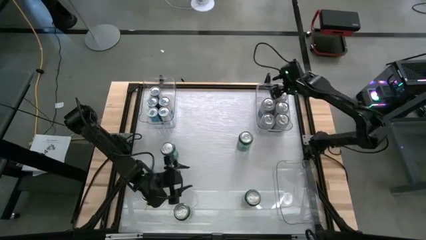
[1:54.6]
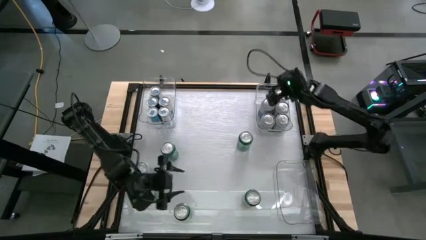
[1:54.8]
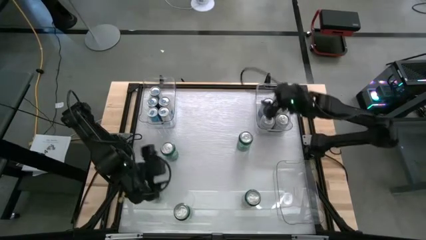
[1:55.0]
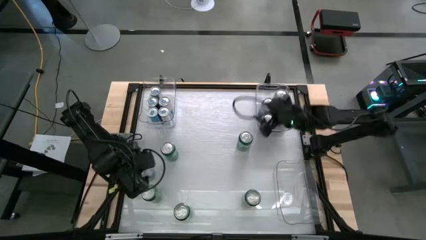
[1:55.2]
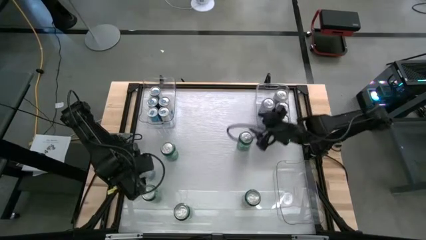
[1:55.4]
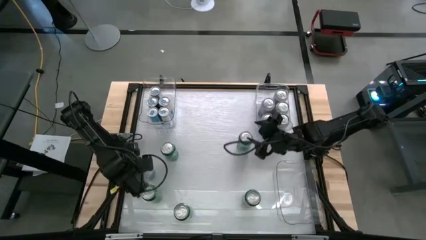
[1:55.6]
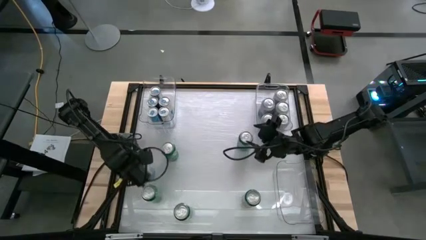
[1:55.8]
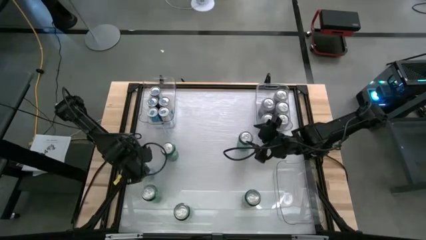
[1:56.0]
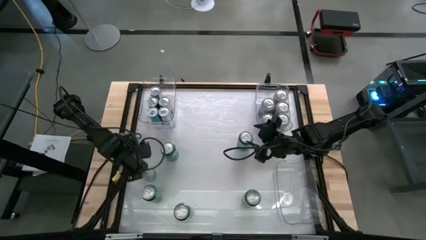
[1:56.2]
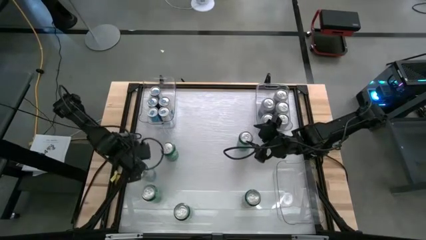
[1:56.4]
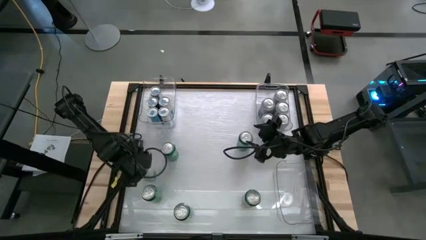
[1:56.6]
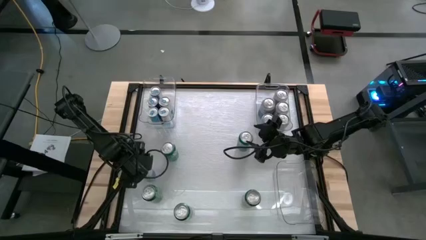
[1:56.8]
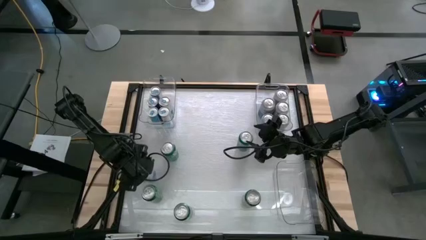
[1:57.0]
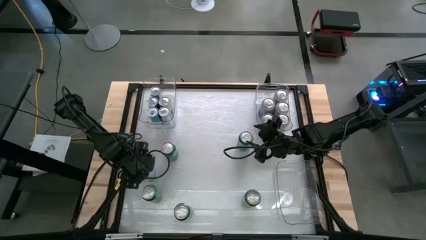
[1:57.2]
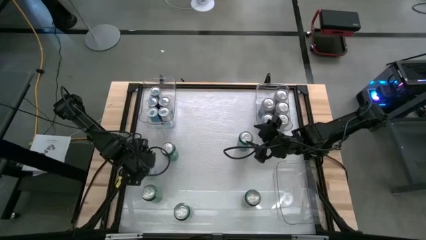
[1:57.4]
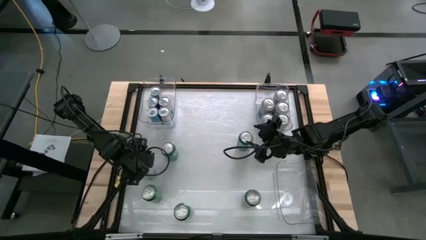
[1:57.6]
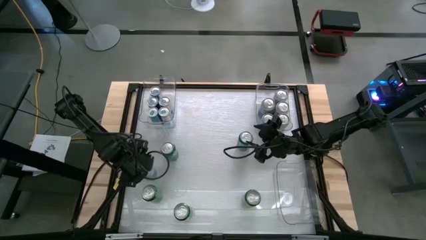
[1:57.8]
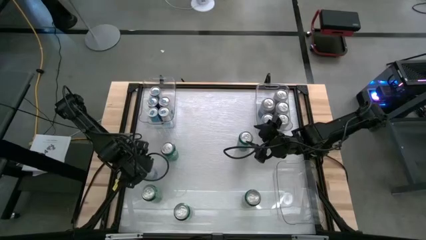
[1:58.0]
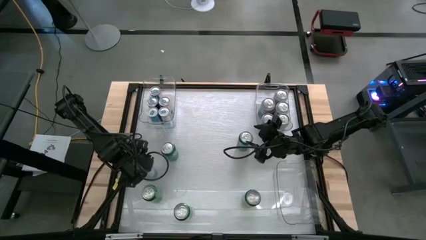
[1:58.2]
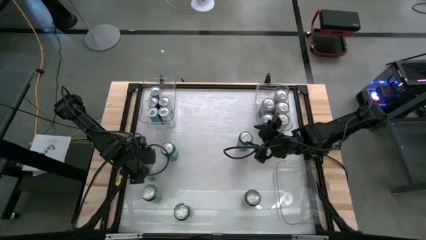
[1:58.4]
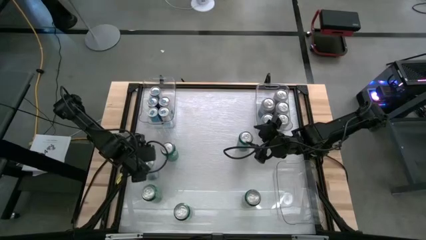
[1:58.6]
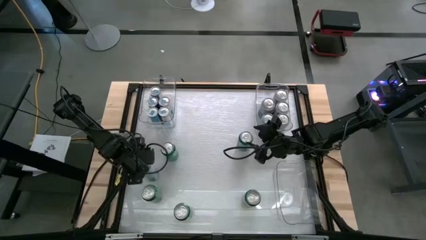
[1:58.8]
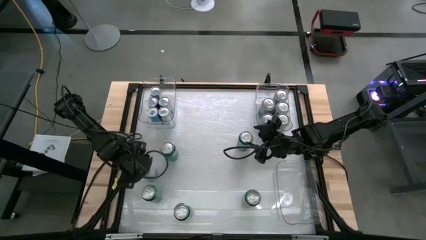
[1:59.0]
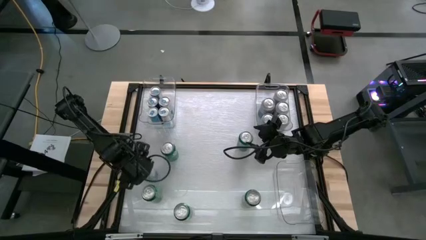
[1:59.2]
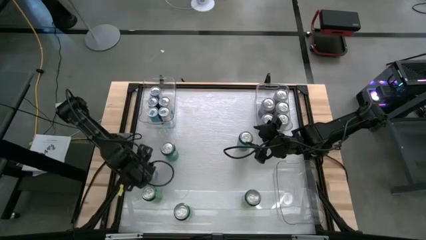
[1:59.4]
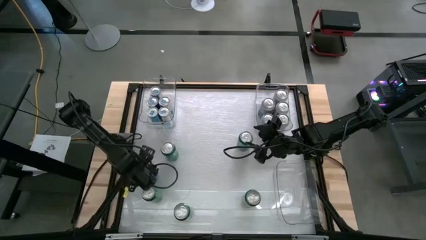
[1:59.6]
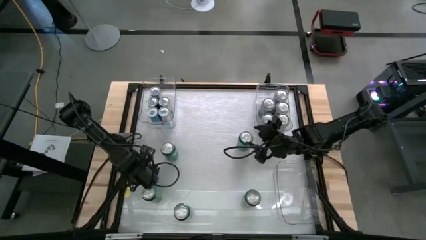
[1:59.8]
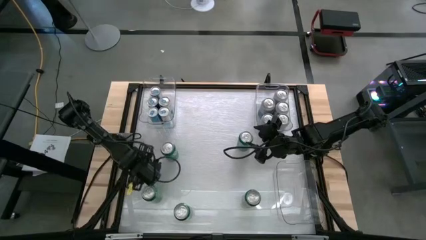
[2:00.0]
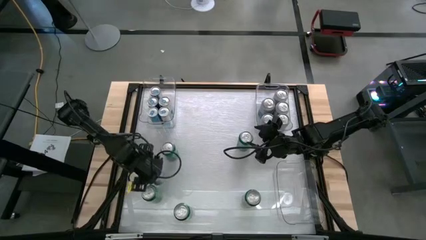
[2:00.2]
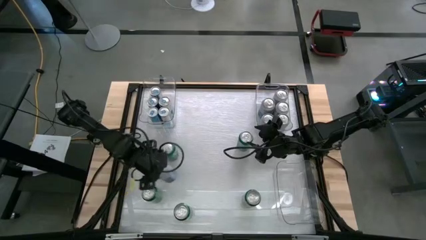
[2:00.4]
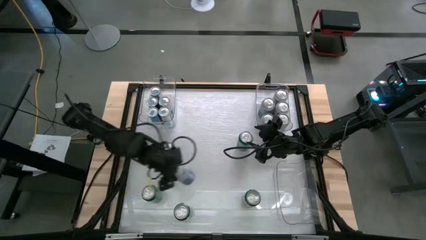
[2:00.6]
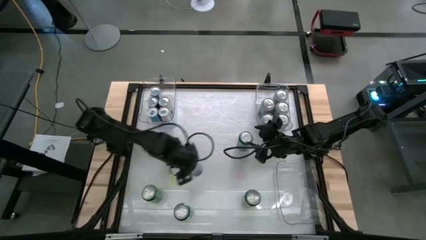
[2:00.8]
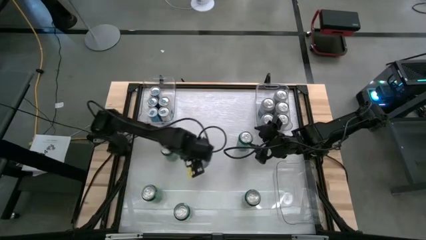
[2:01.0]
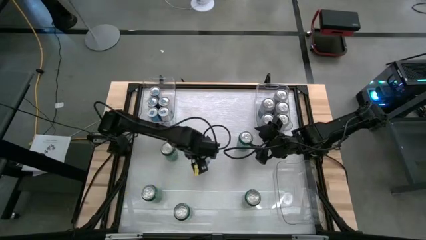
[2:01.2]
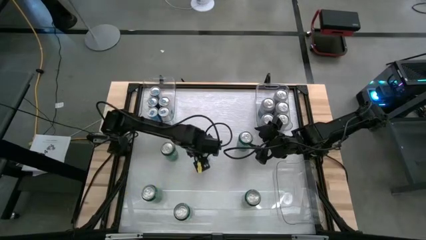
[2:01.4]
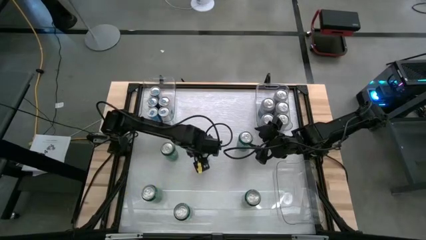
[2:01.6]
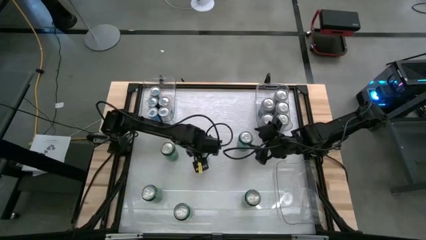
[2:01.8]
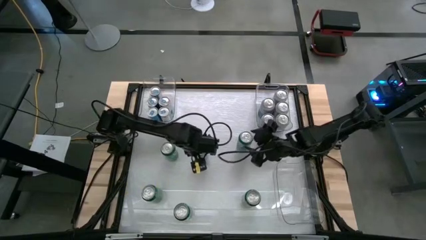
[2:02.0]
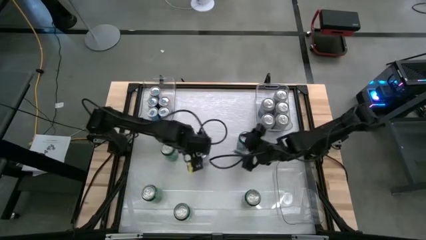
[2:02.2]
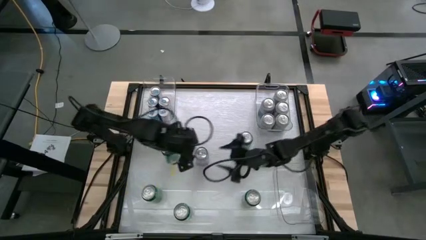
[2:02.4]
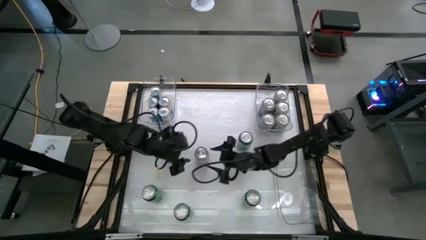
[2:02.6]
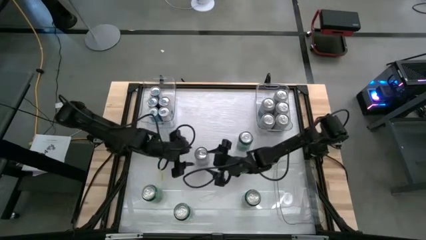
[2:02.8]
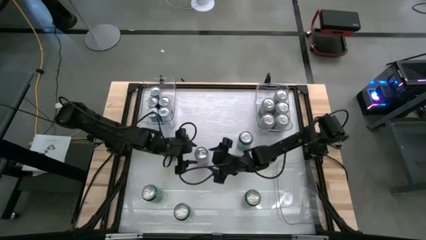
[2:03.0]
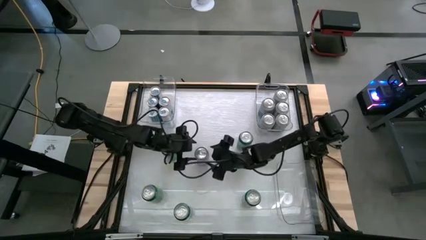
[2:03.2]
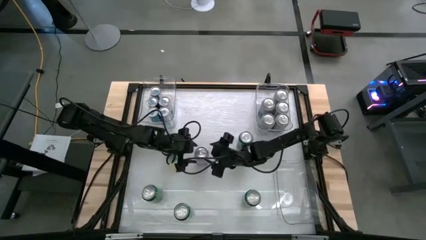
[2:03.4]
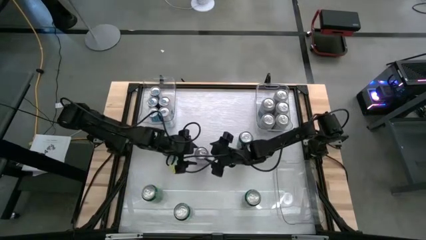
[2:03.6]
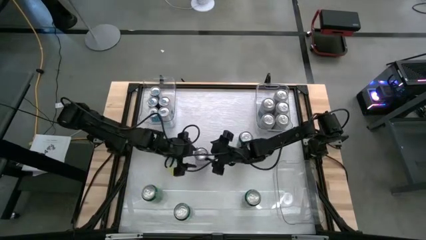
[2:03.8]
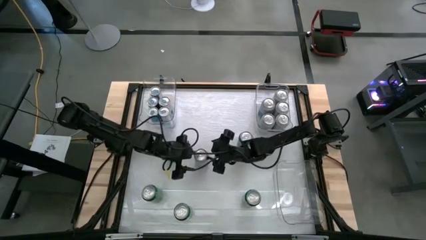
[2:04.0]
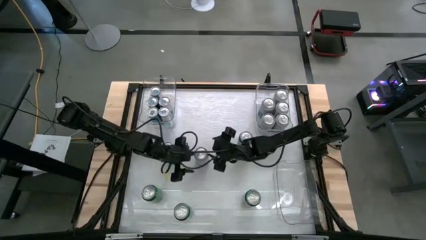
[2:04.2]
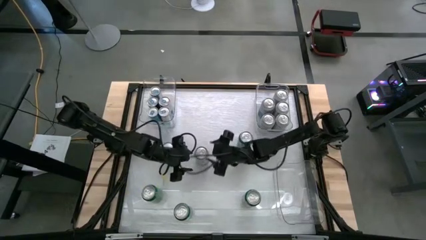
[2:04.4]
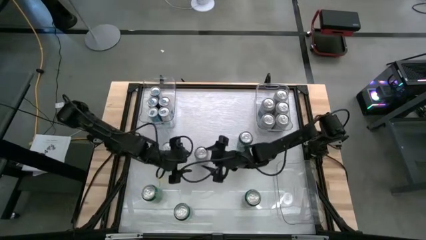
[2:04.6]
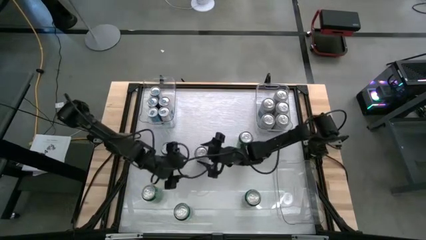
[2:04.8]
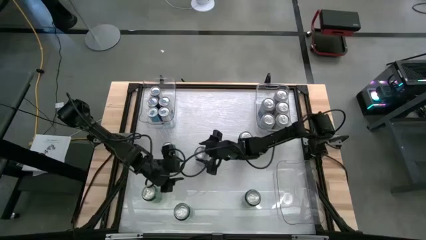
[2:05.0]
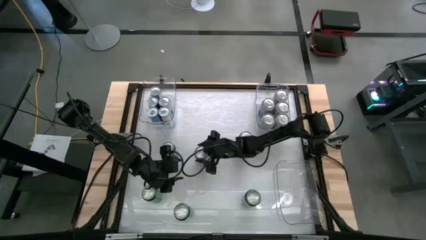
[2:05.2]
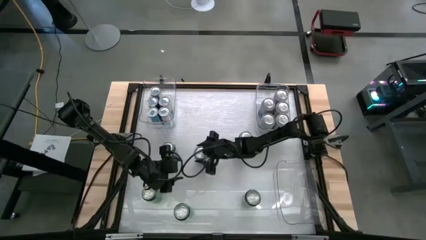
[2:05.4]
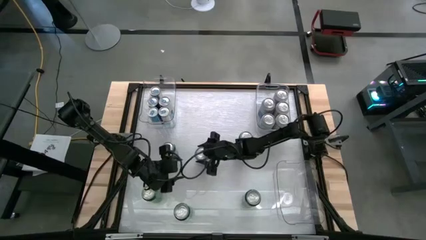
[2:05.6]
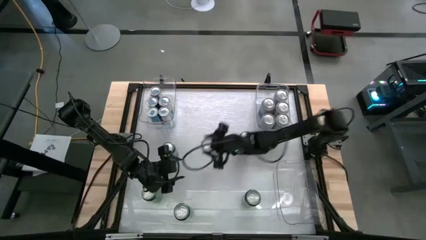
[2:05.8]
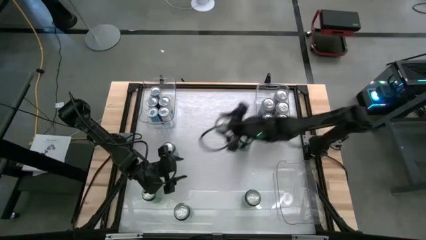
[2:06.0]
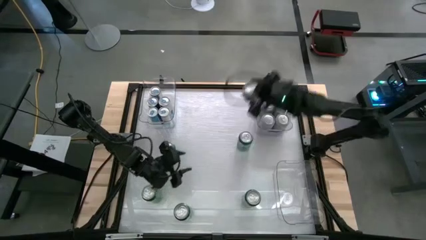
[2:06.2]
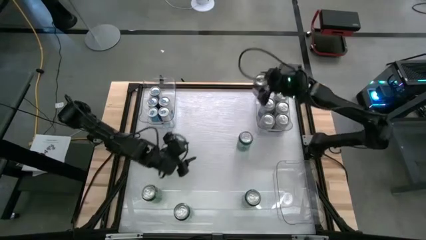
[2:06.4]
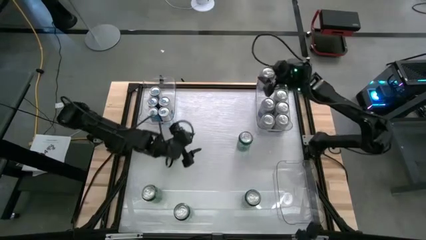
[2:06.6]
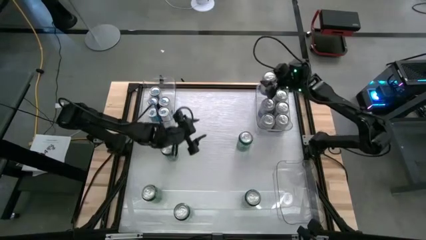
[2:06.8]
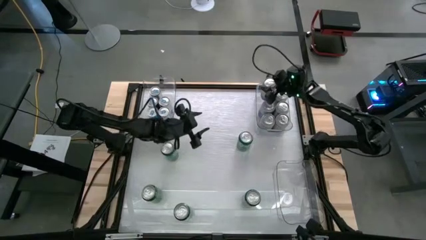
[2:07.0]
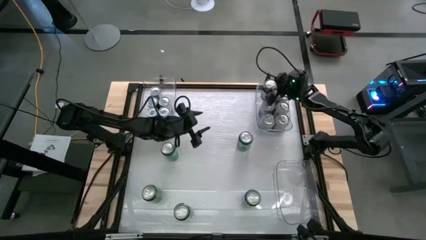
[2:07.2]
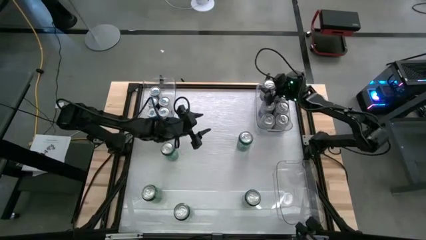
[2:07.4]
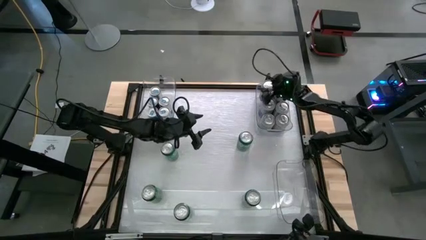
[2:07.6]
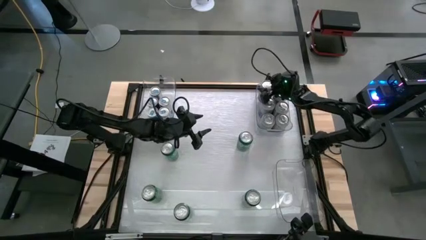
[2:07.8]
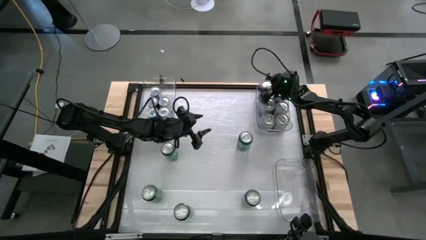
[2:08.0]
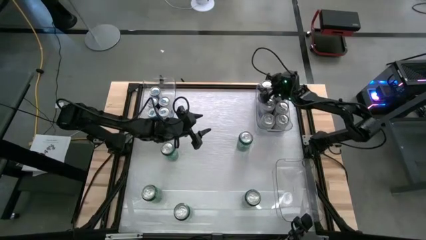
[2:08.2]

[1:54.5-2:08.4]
Task: Sort soda cans
Put the blue-white soda can into the top right transparent bin

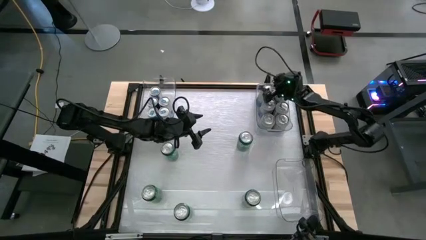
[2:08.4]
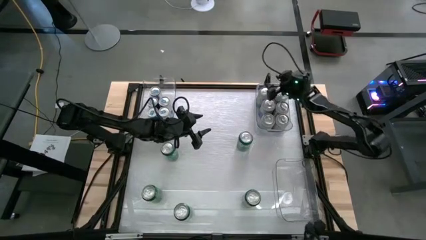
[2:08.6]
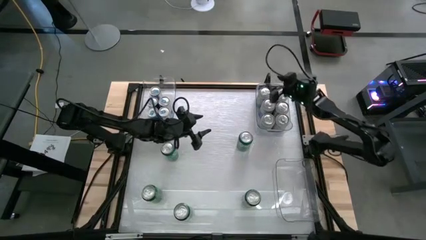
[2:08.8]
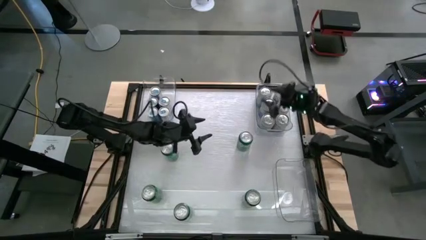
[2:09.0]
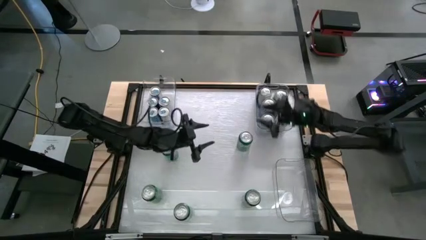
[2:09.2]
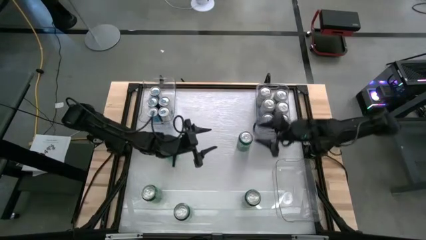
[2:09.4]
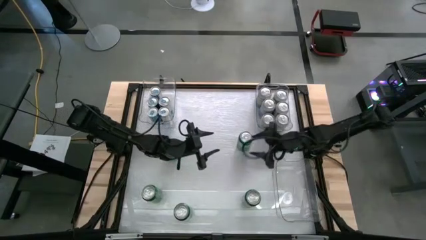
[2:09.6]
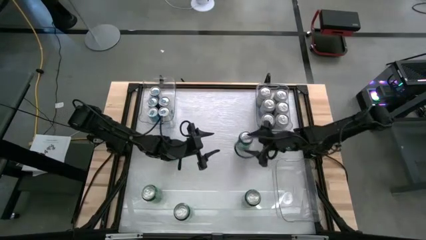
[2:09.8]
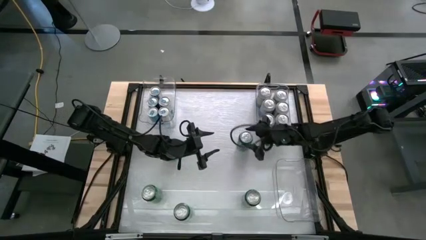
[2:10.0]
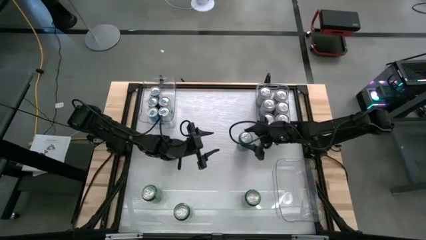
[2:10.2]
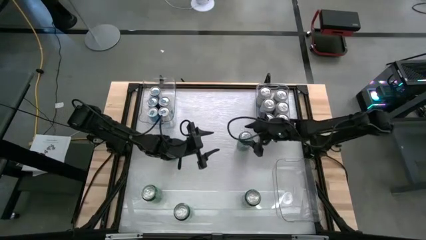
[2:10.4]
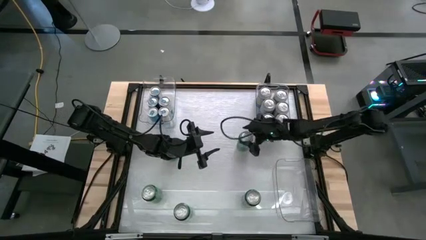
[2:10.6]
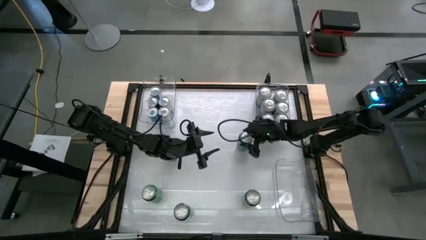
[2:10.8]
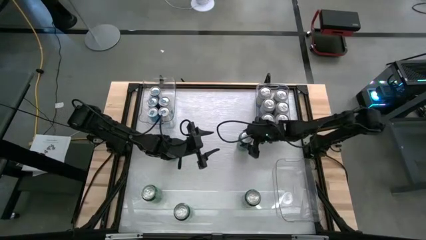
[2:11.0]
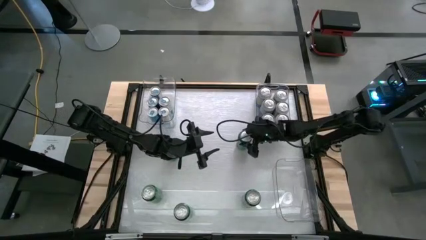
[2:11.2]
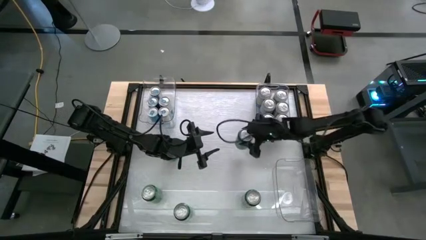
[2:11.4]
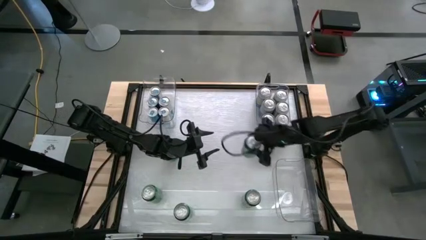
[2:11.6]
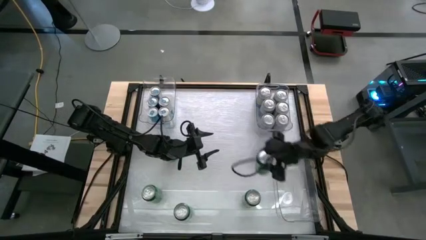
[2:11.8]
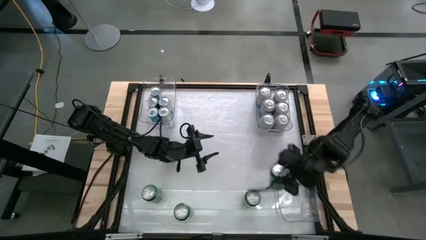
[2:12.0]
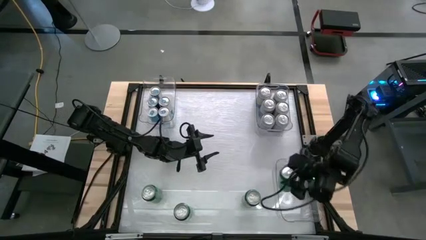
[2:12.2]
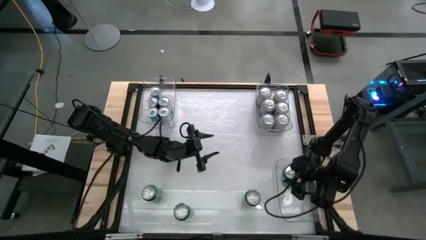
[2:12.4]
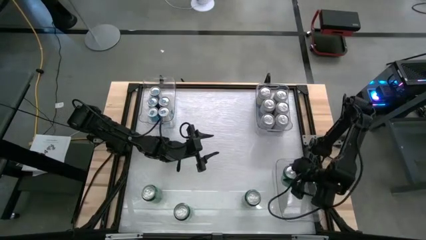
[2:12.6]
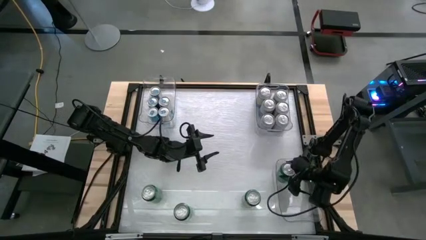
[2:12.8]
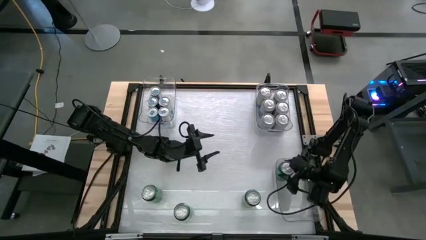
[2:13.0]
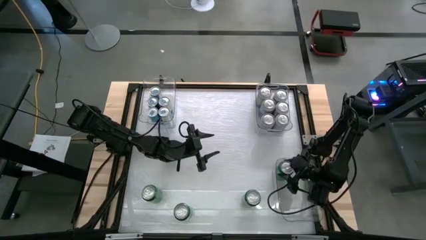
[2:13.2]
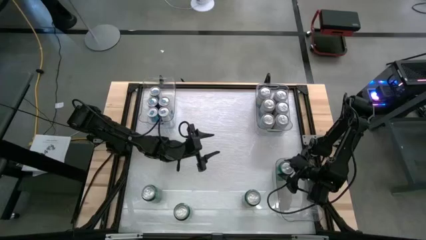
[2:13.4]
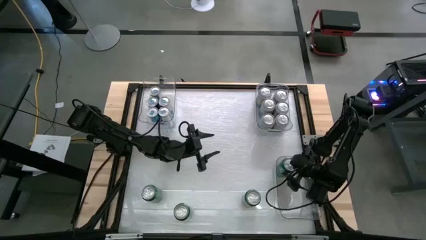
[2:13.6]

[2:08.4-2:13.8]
Put the green soda can into the bottom transparent bin
